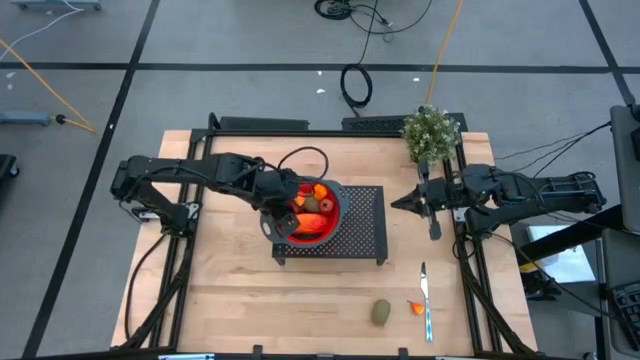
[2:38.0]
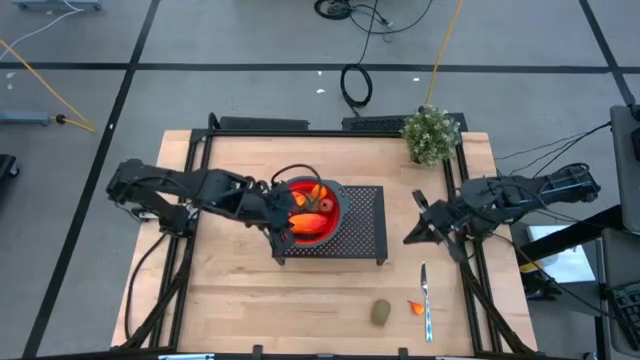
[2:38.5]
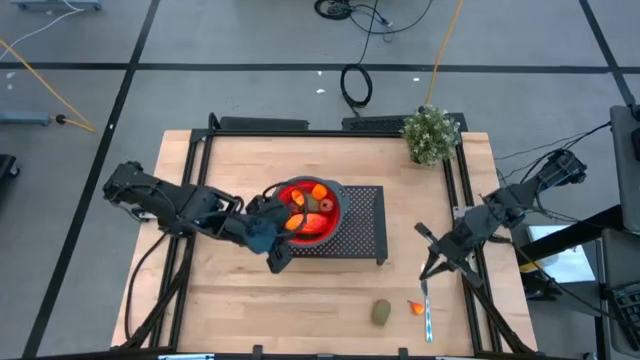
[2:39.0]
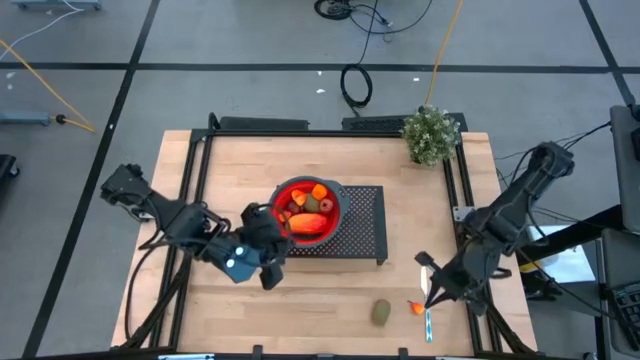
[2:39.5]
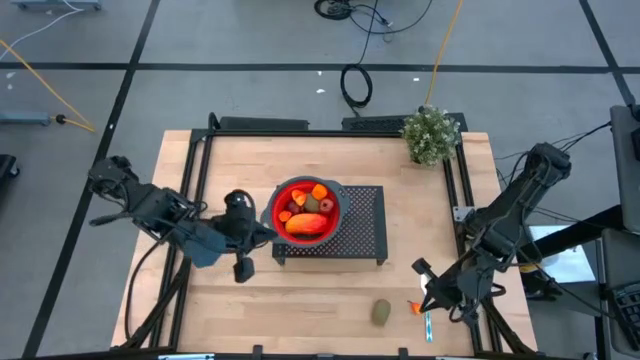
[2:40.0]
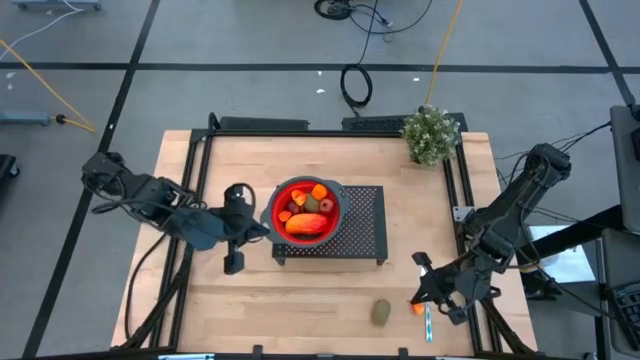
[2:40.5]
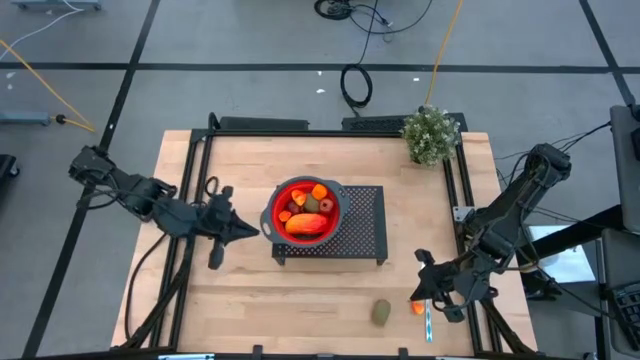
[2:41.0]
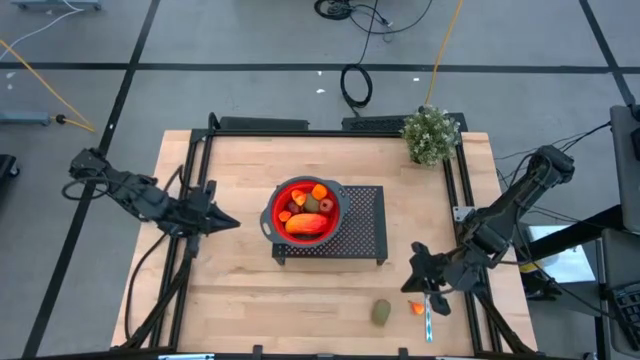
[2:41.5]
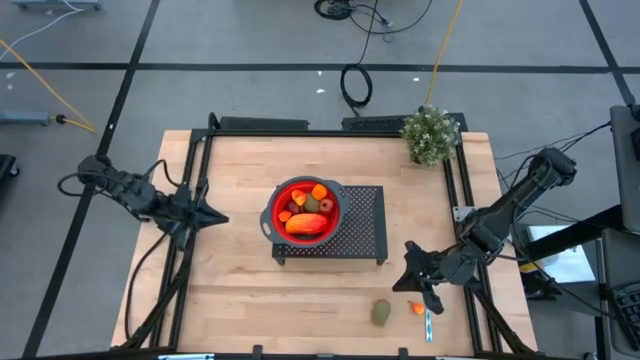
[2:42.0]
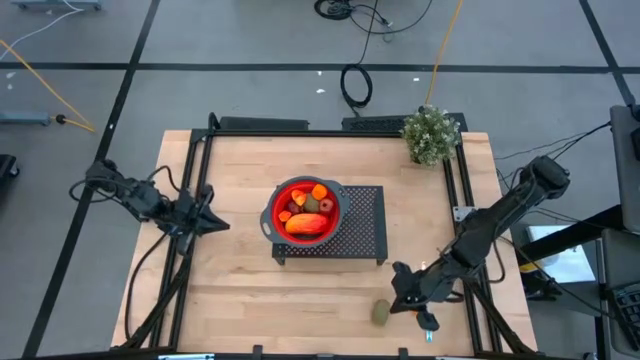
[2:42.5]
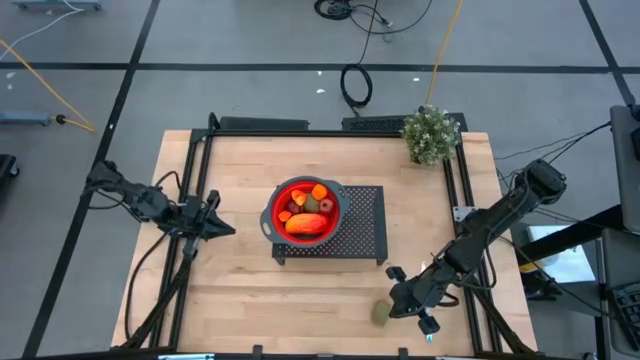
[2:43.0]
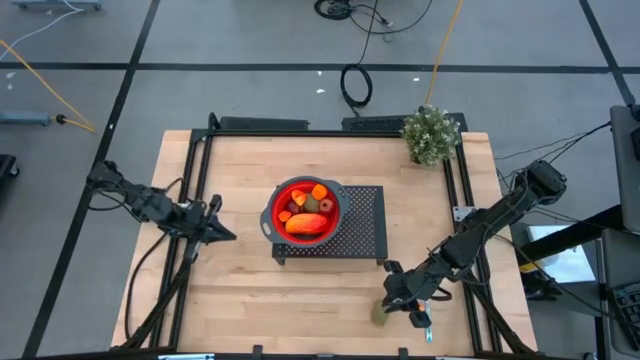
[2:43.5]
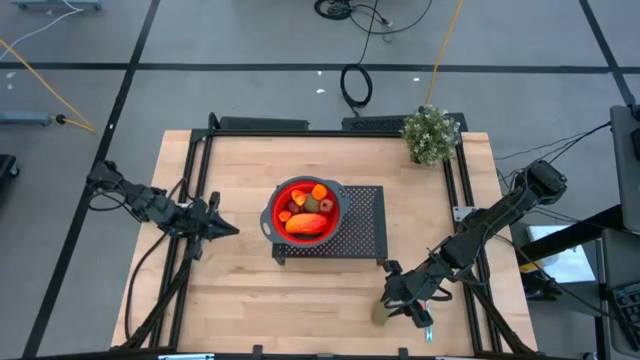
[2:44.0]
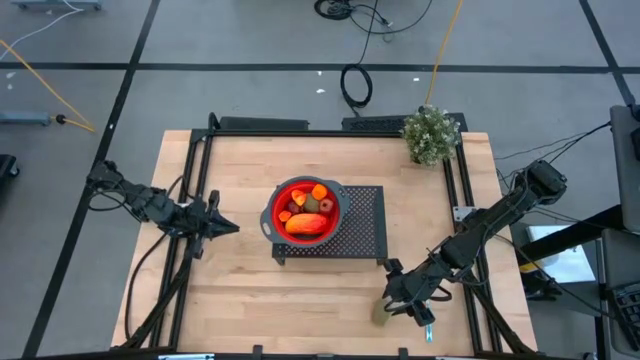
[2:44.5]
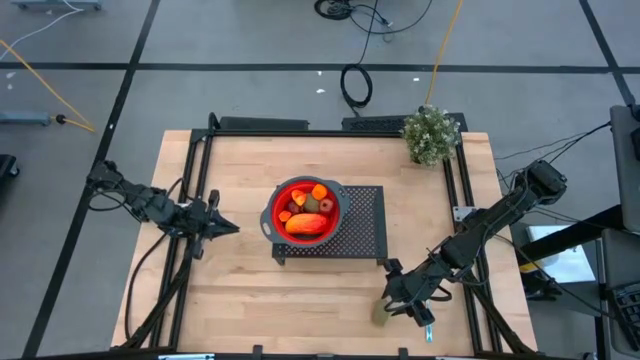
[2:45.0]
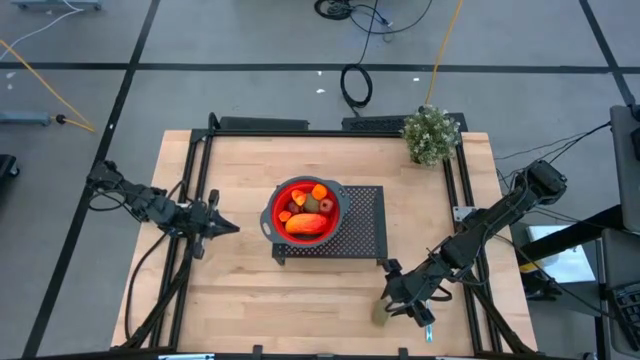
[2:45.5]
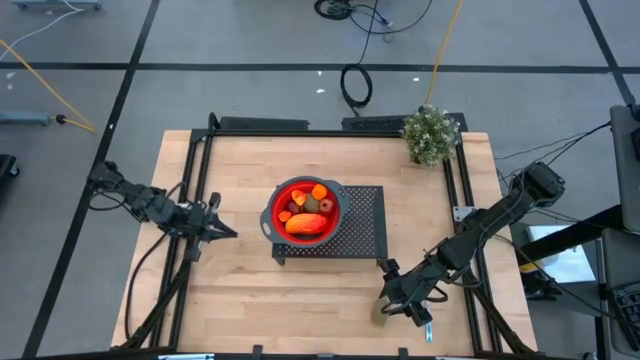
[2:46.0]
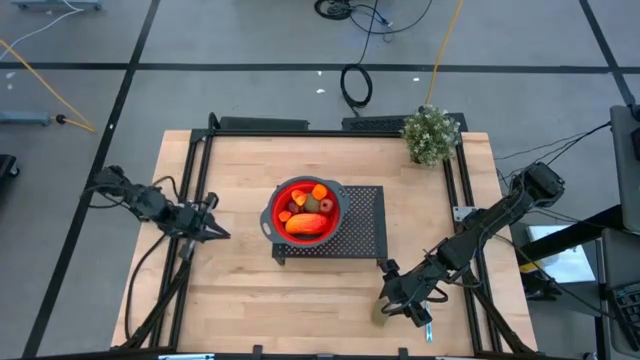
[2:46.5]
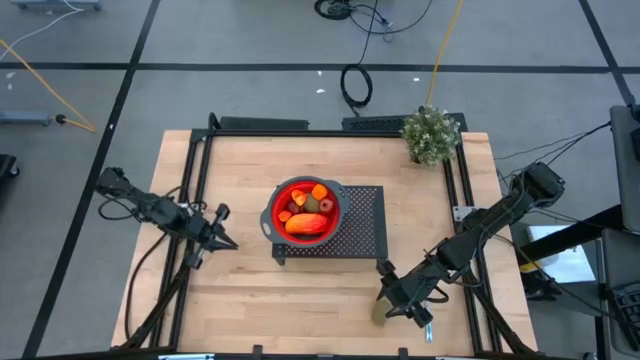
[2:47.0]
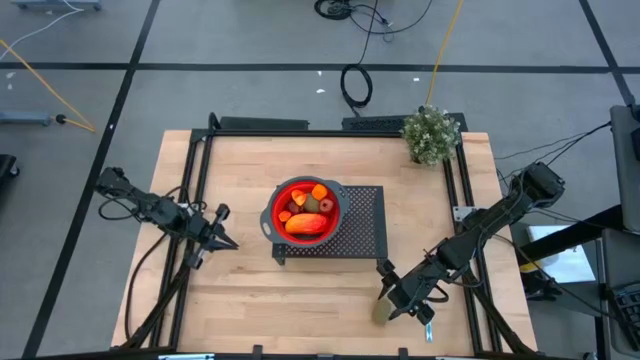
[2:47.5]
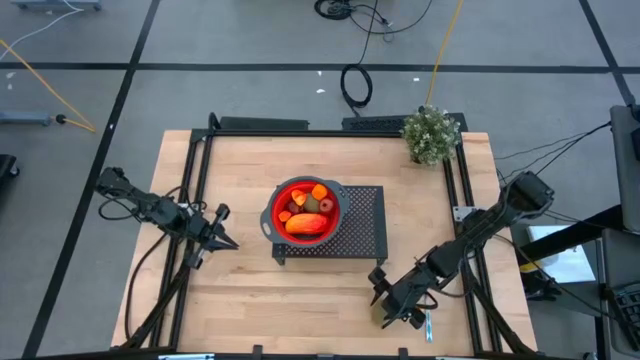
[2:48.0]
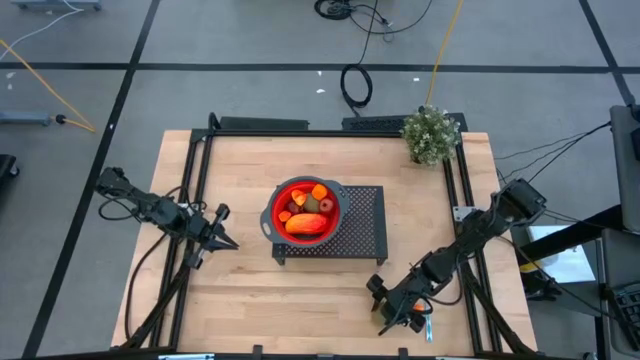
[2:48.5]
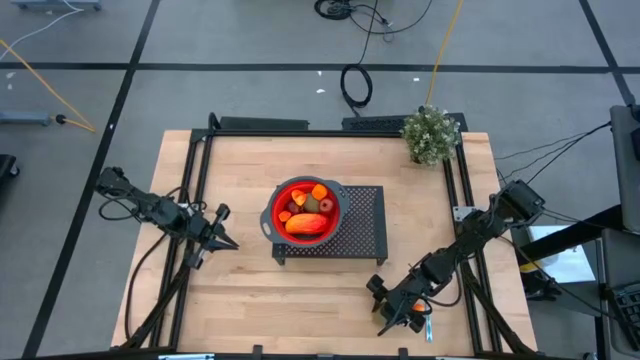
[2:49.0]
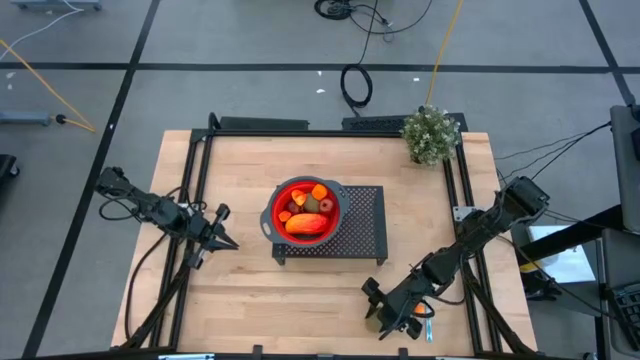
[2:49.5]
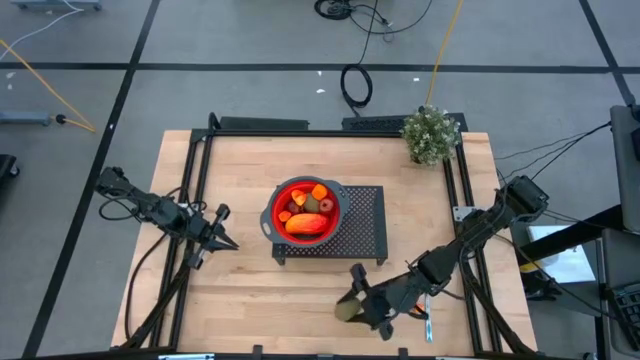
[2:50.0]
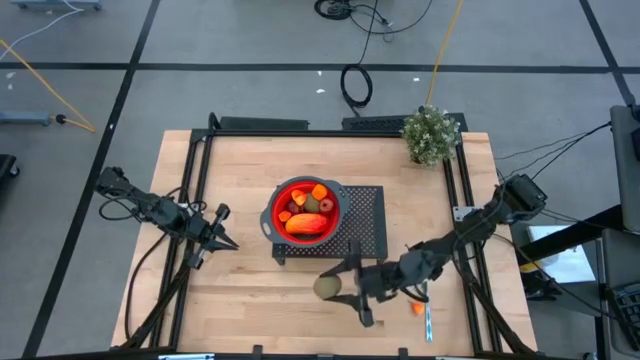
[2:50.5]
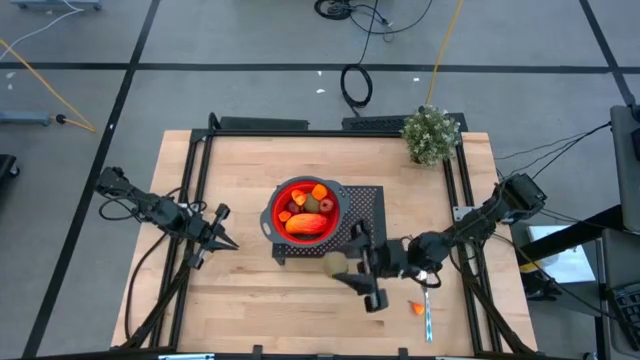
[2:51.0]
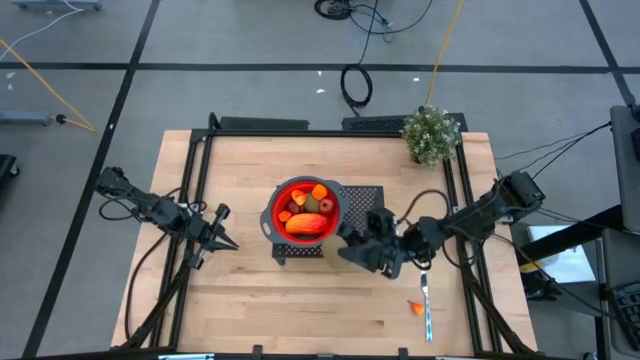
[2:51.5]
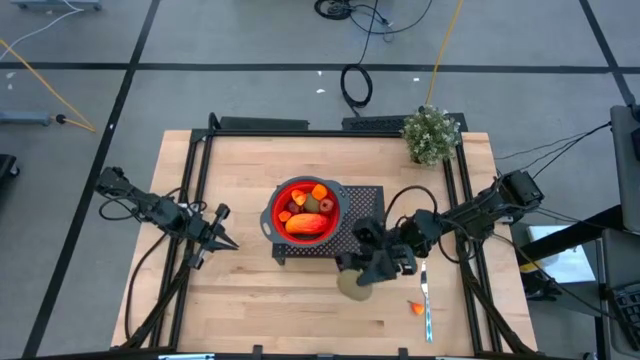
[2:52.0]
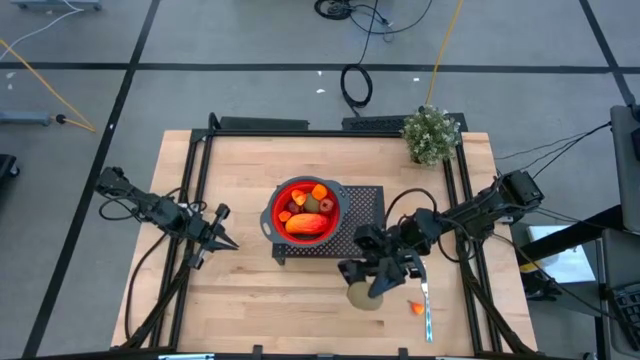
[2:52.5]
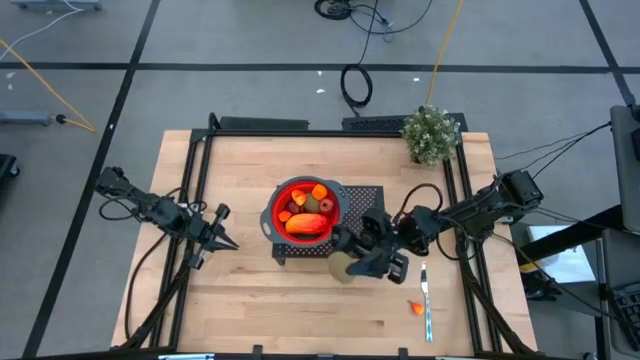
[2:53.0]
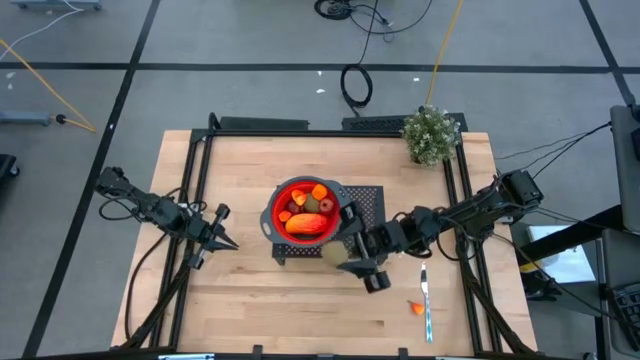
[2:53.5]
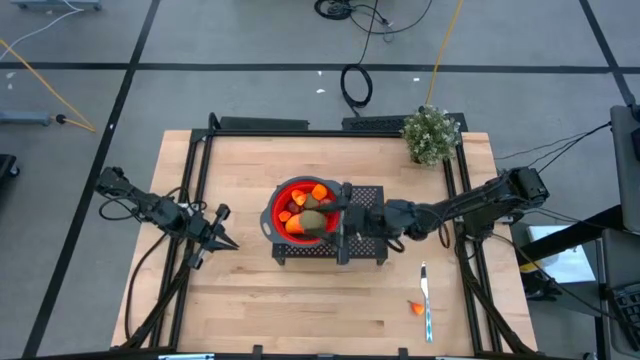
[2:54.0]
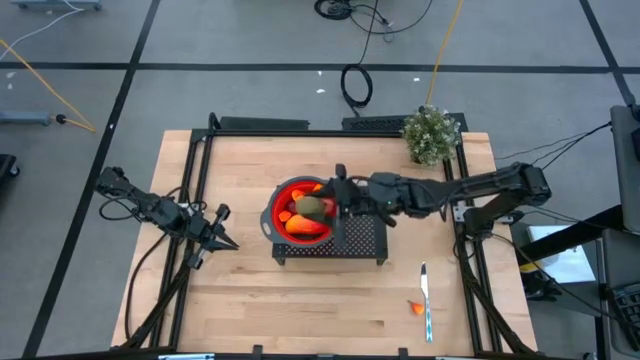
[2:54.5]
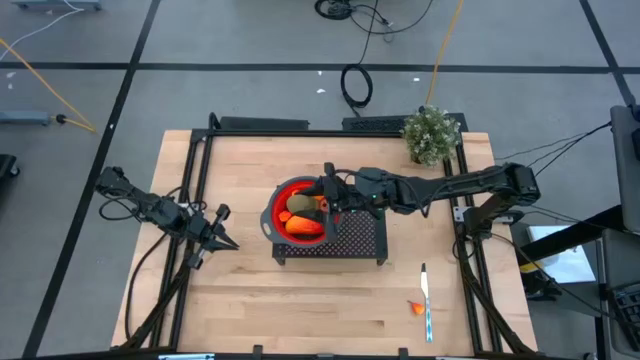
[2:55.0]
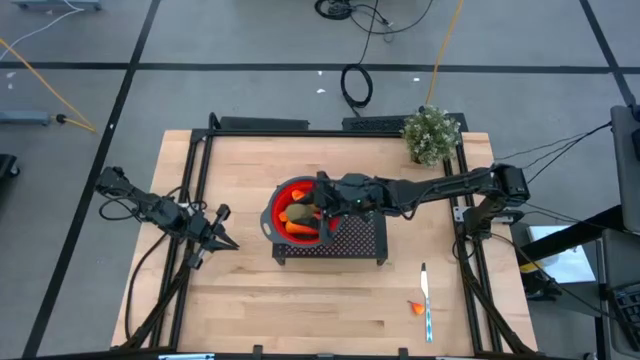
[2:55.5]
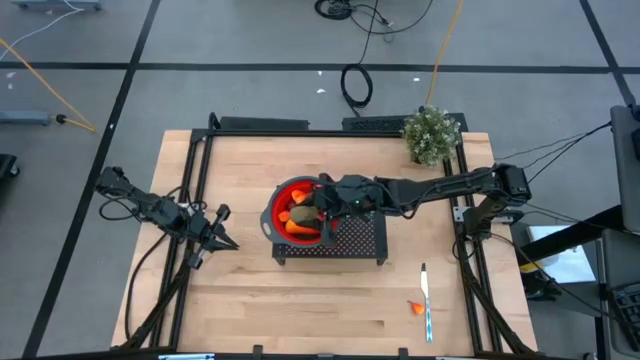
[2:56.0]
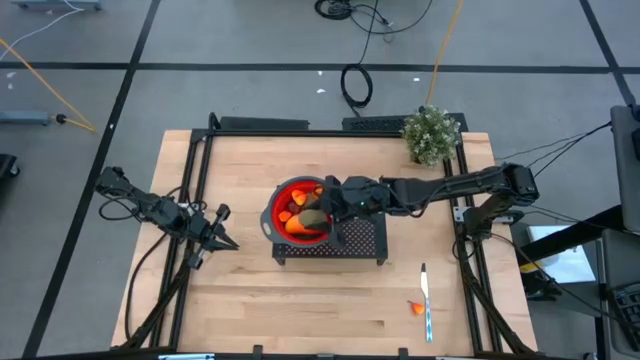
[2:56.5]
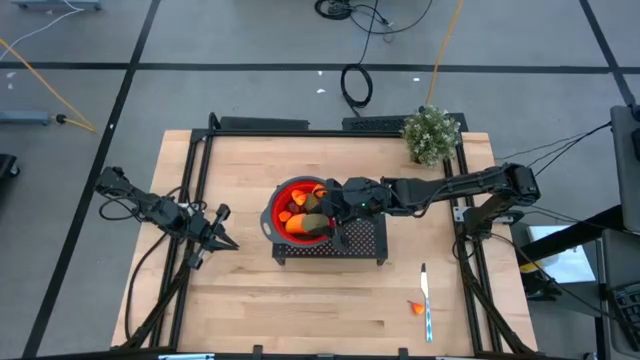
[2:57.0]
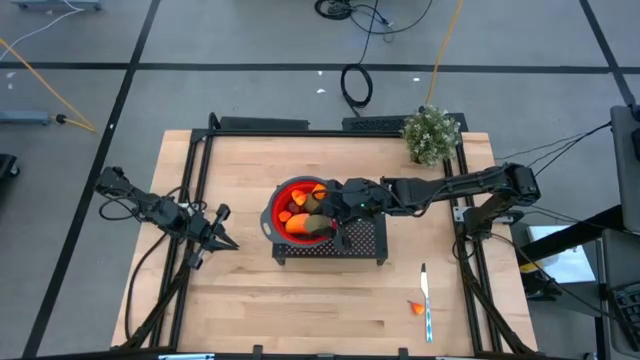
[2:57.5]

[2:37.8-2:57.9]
Task: Pick & Place Fruit
Put the brown kiwi into the red strainer bowl on the shelf

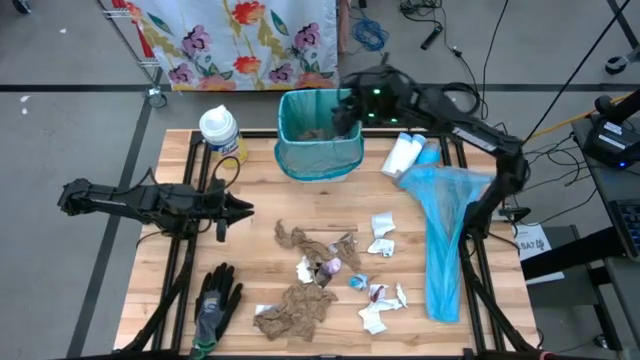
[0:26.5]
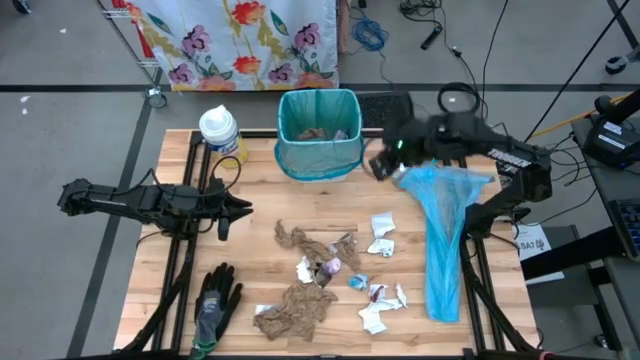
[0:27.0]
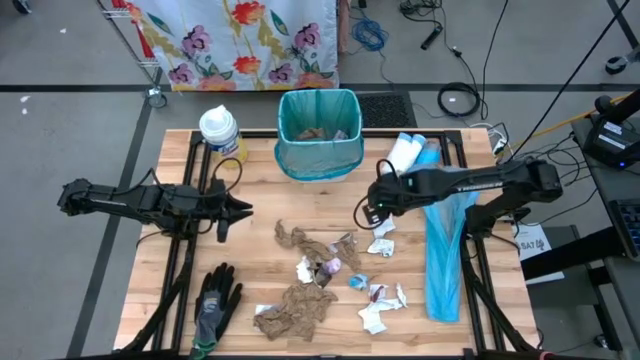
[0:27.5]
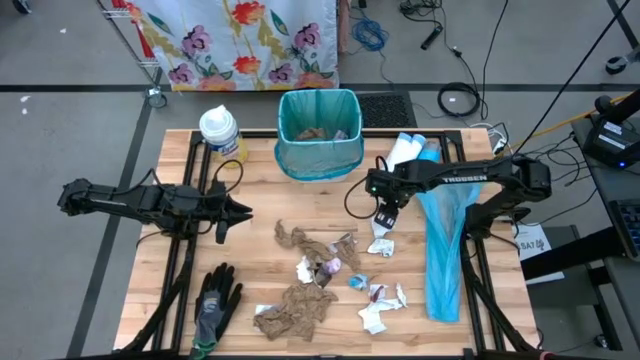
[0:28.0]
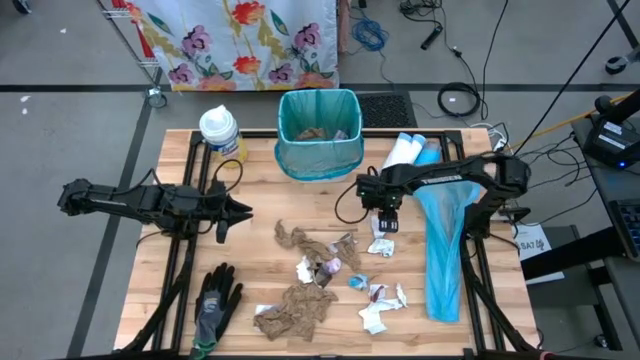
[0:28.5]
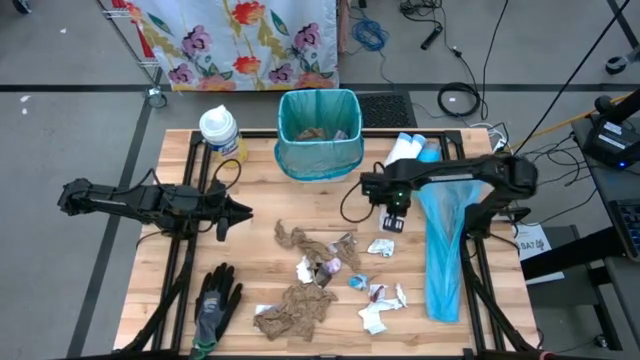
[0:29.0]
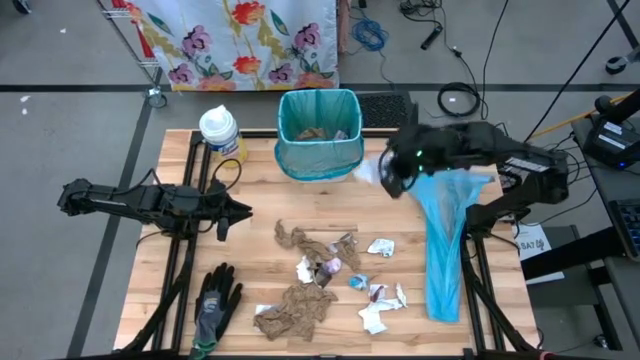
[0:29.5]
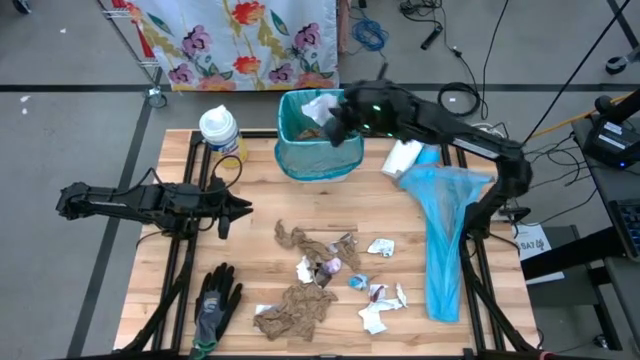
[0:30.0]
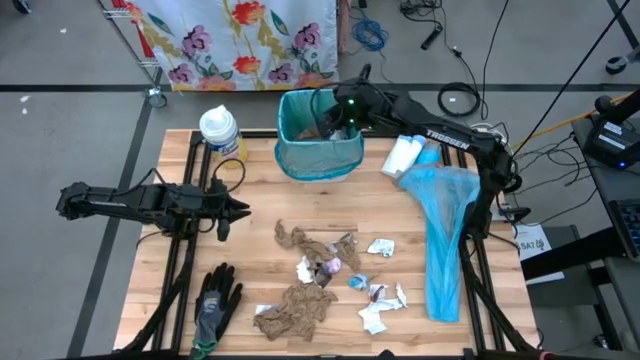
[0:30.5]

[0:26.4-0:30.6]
Task: place trash/remove bag and relplace
Put the white paper into the white trash bin
